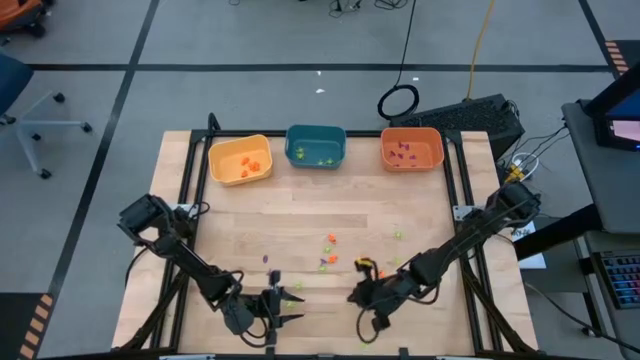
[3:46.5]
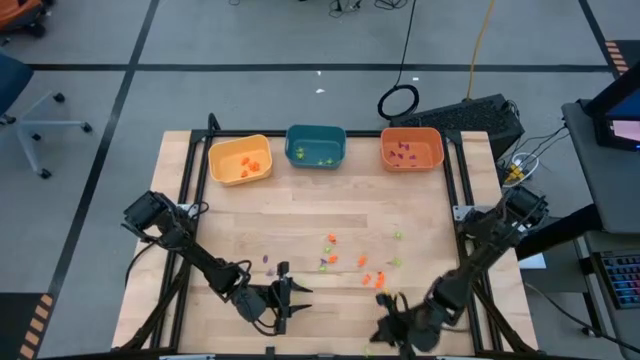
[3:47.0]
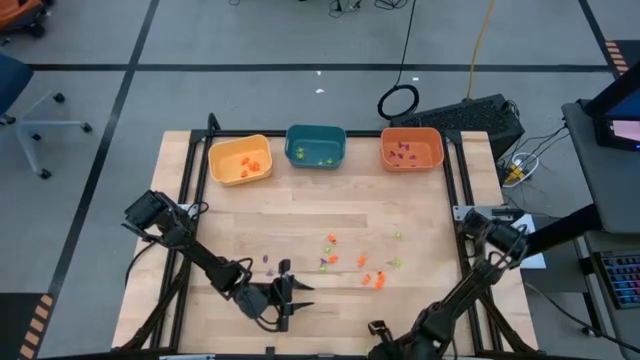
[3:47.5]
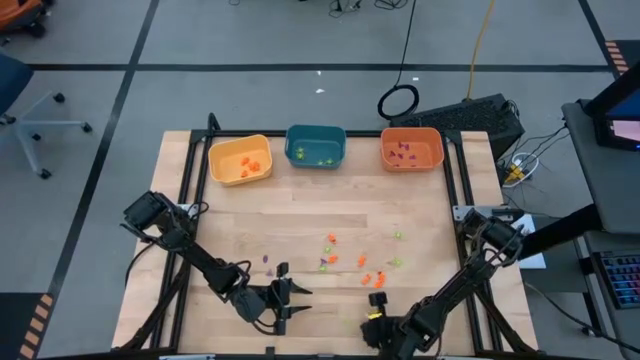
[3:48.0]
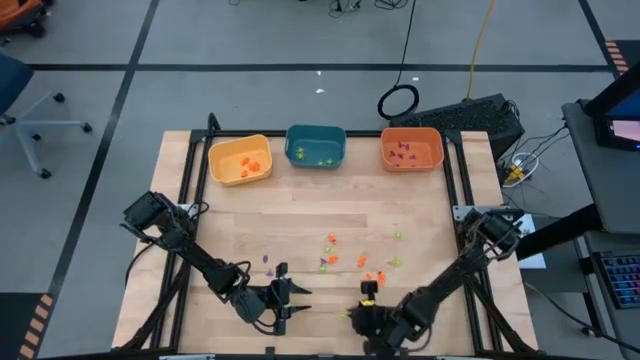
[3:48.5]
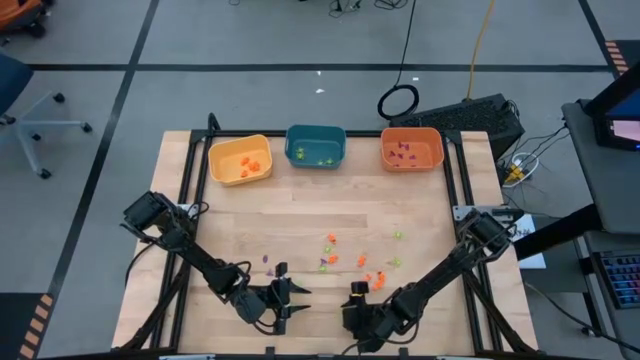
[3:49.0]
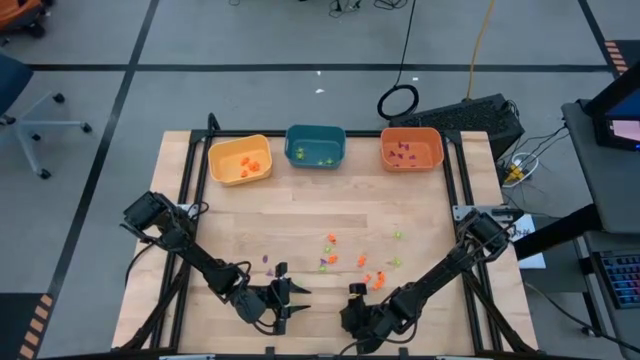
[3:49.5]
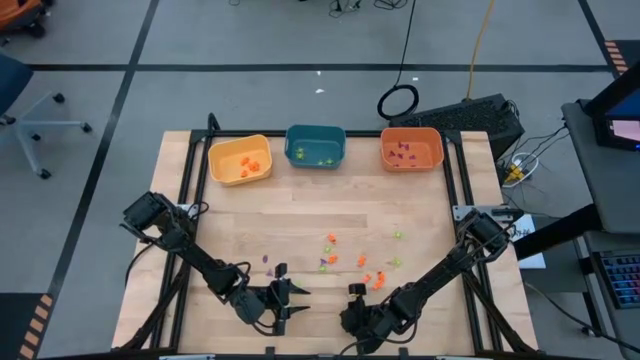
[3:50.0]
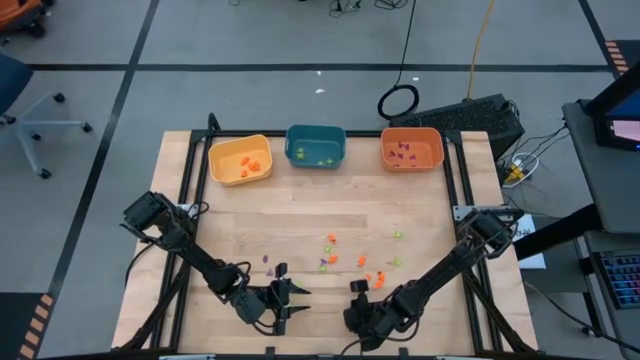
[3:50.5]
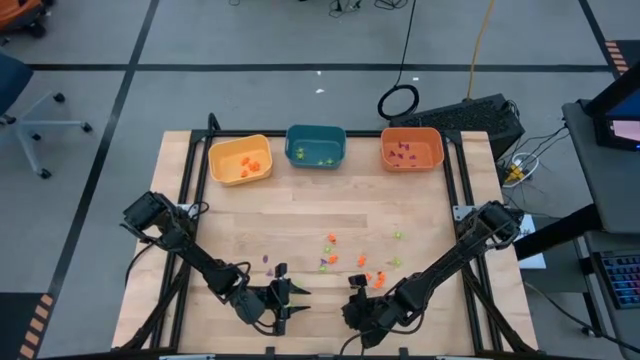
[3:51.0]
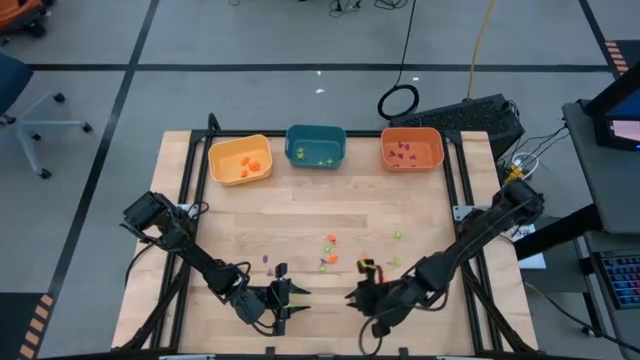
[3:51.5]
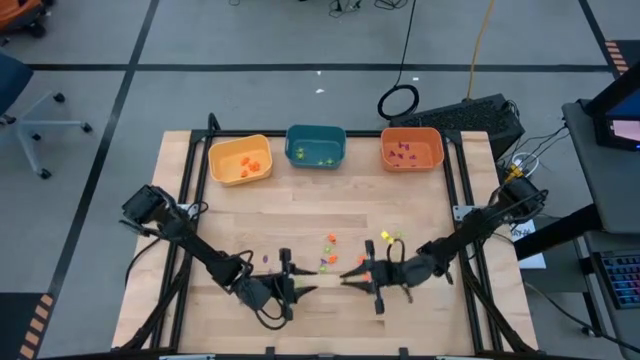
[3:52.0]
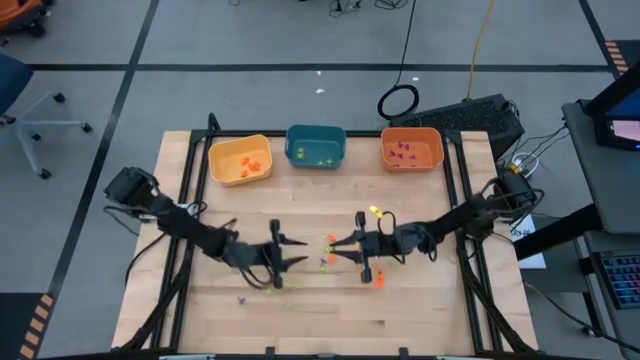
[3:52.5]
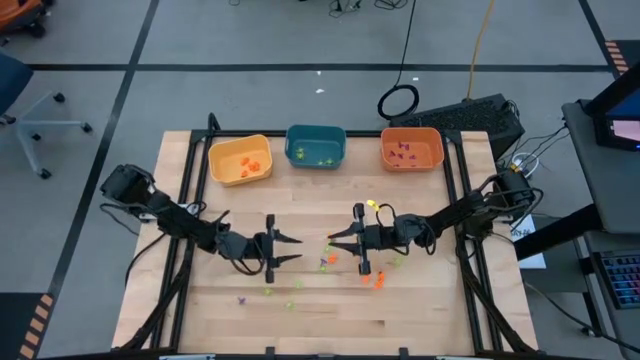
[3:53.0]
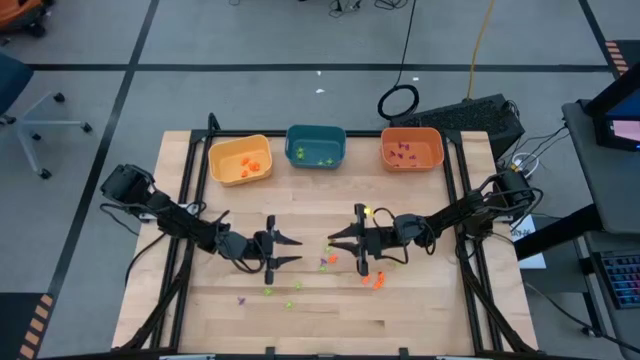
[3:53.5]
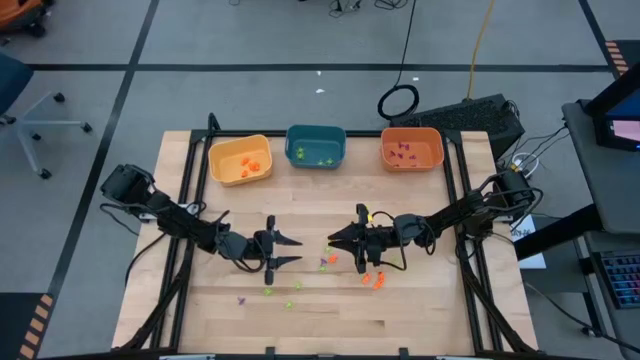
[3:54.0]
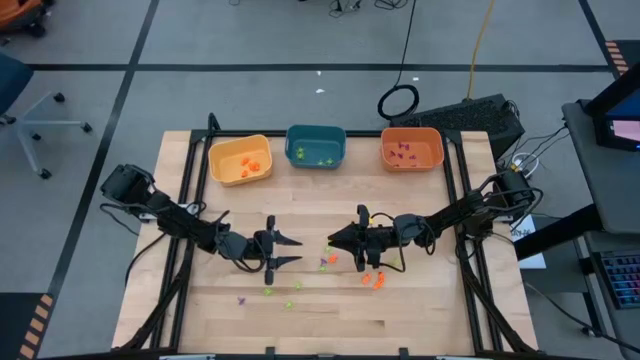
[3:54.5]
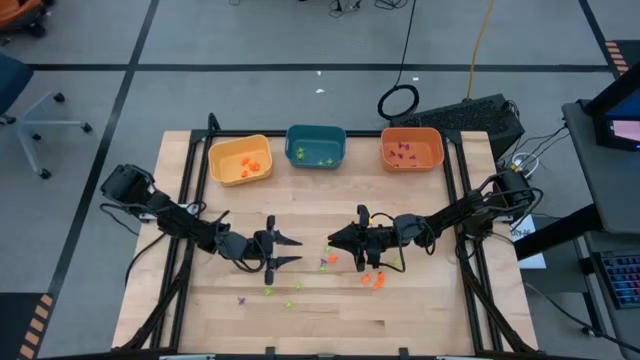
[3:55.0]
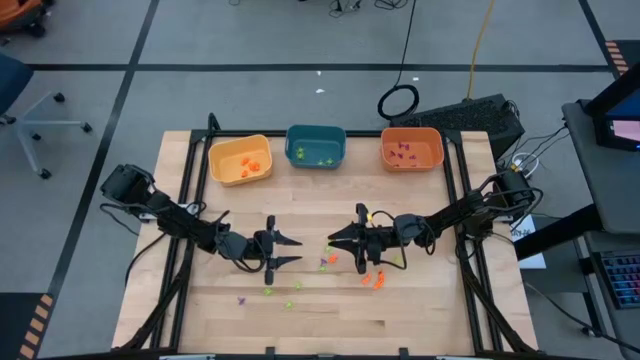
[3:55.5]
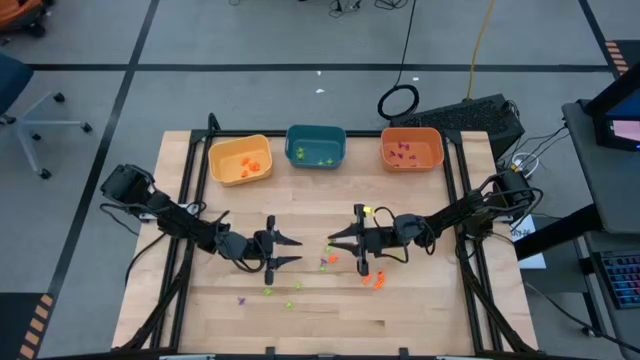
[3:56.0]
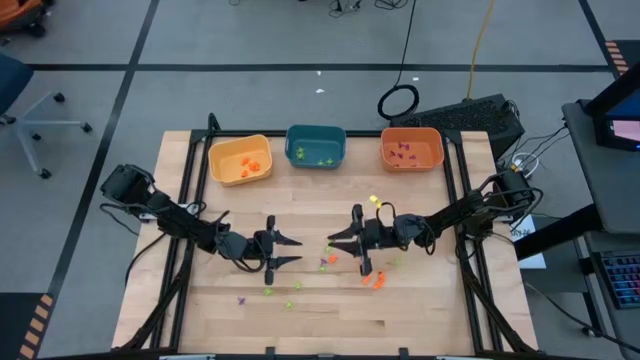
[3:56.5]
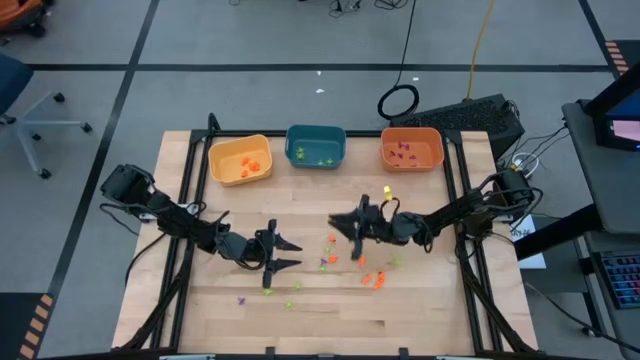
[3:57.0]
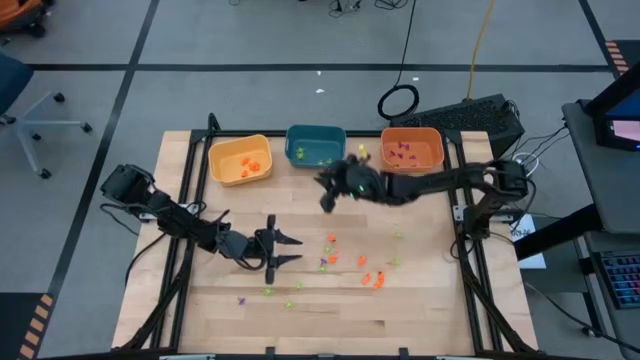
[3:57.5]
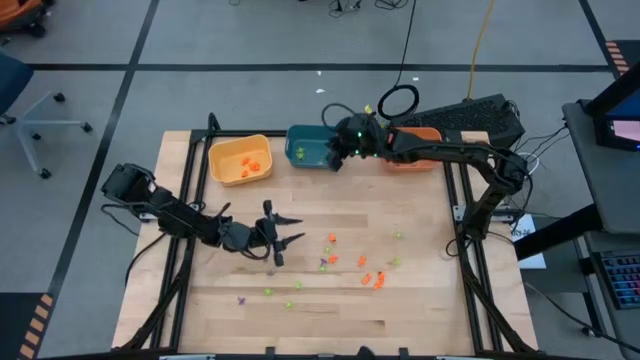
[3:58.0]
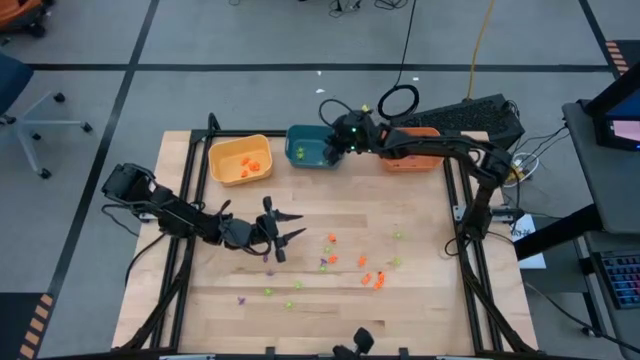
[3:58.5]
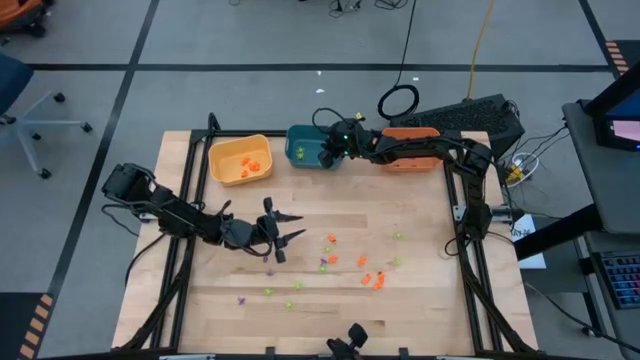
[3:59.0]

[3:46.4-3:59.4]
Task: Sort Halloween decoration
Put the green spider toy into the blue bin

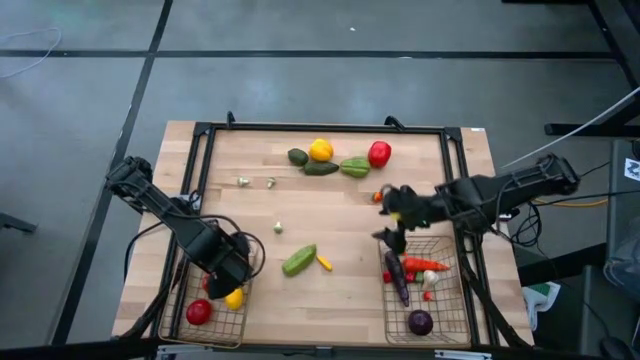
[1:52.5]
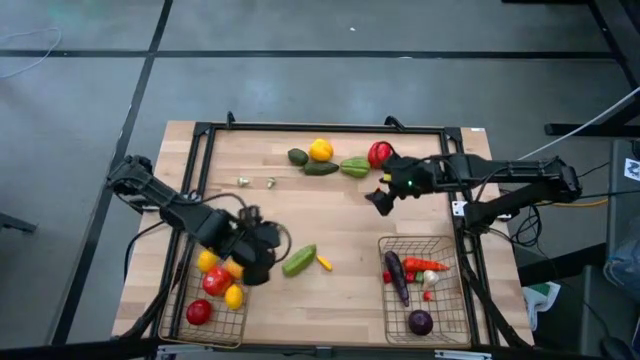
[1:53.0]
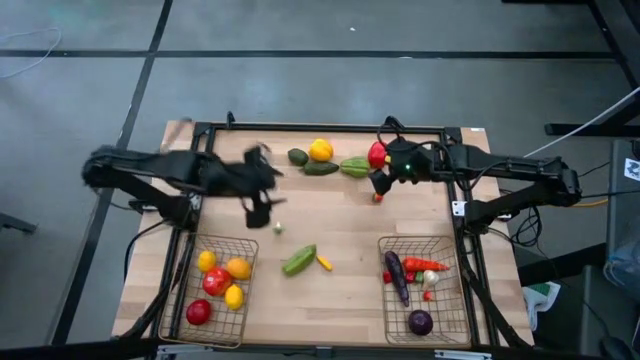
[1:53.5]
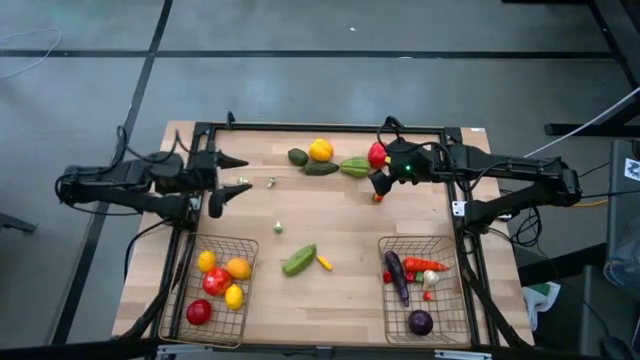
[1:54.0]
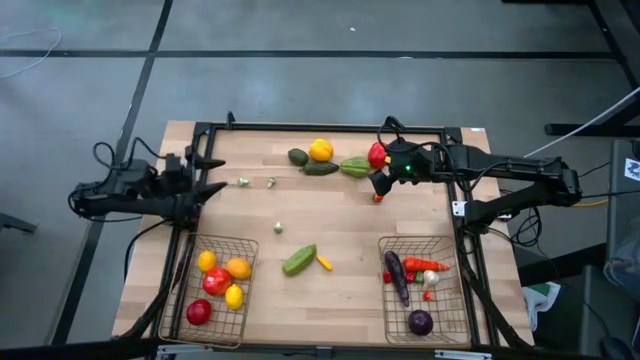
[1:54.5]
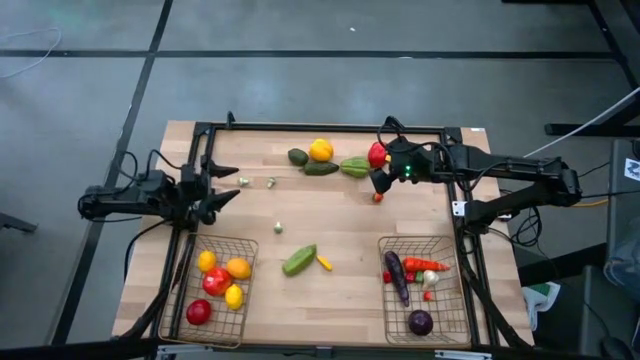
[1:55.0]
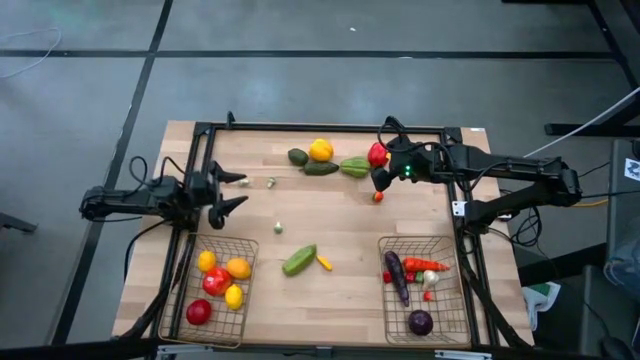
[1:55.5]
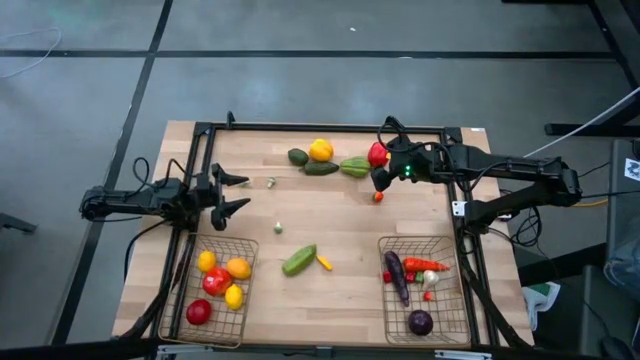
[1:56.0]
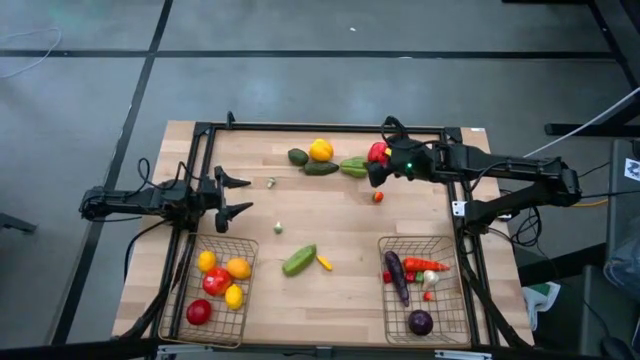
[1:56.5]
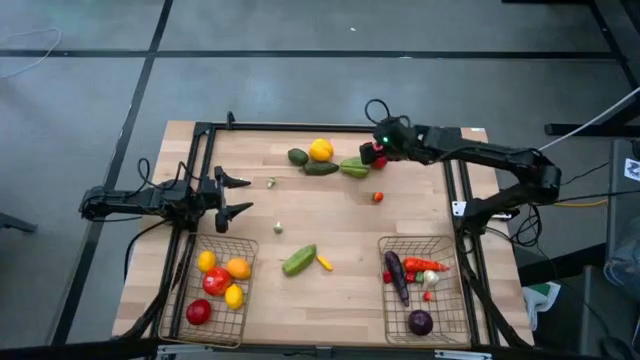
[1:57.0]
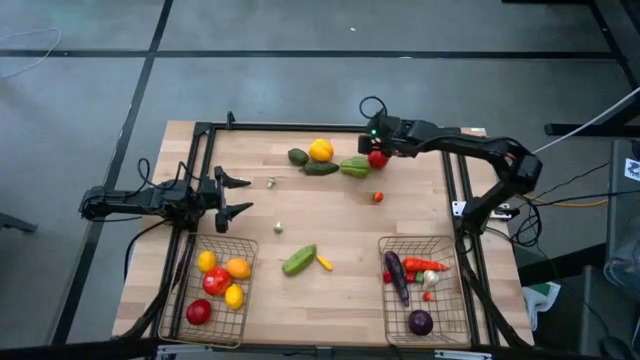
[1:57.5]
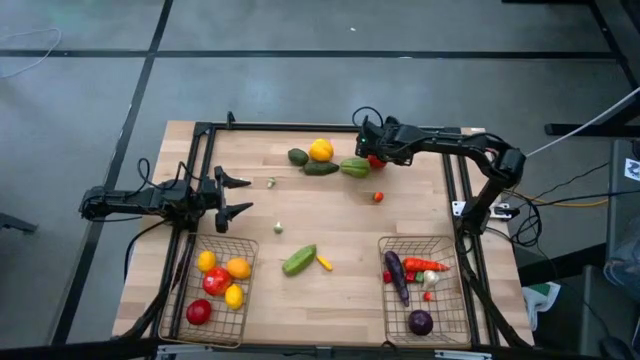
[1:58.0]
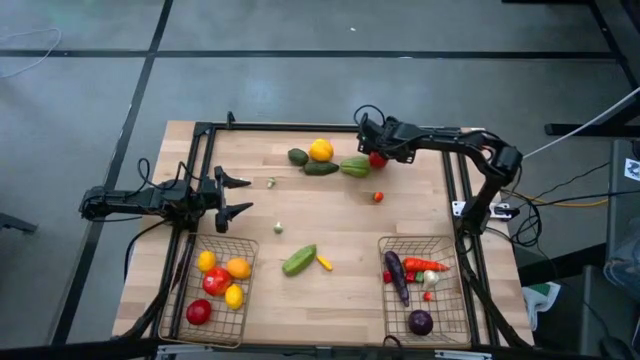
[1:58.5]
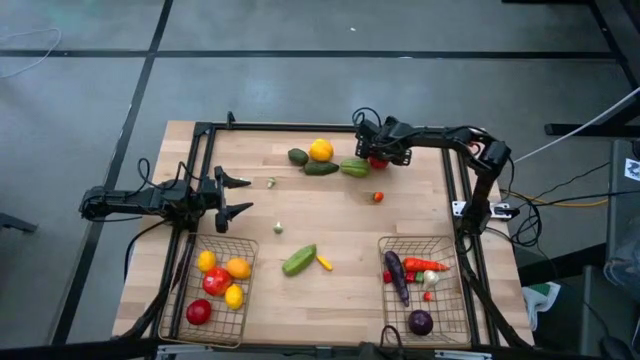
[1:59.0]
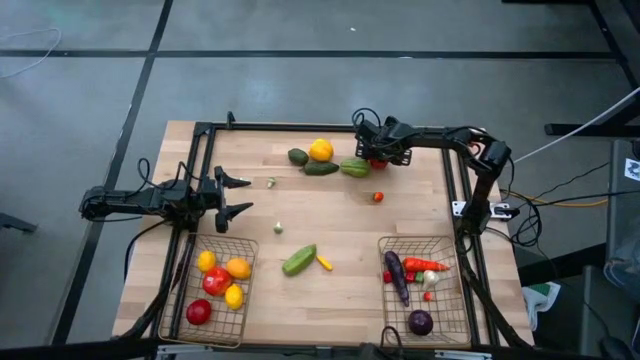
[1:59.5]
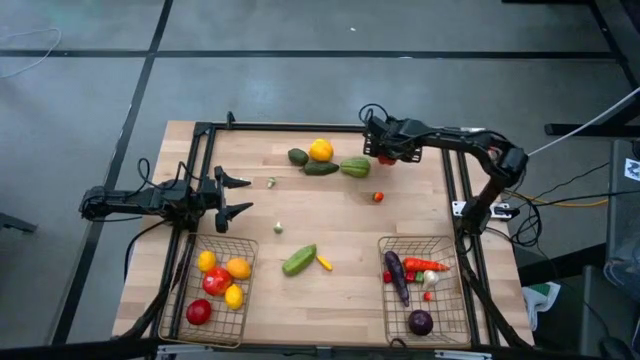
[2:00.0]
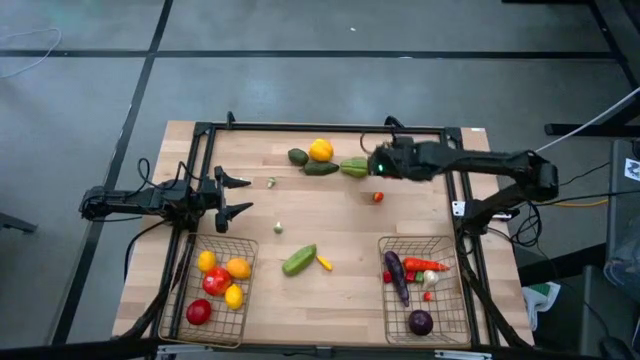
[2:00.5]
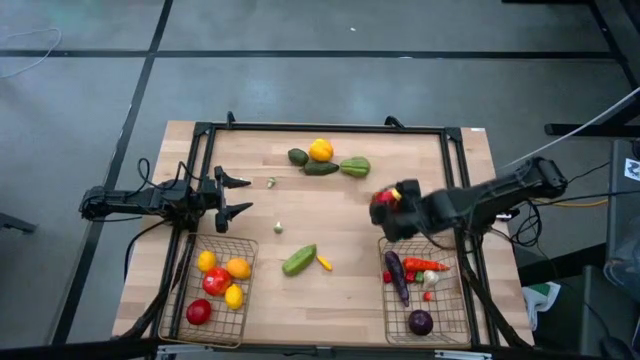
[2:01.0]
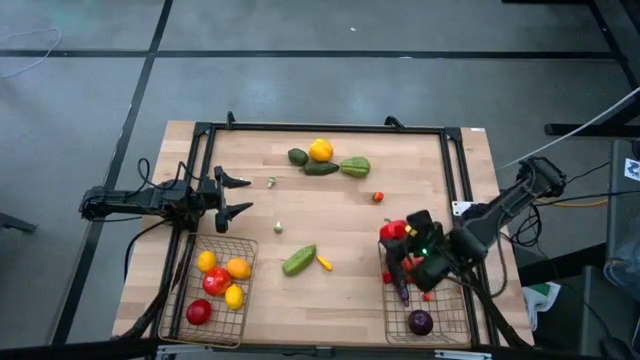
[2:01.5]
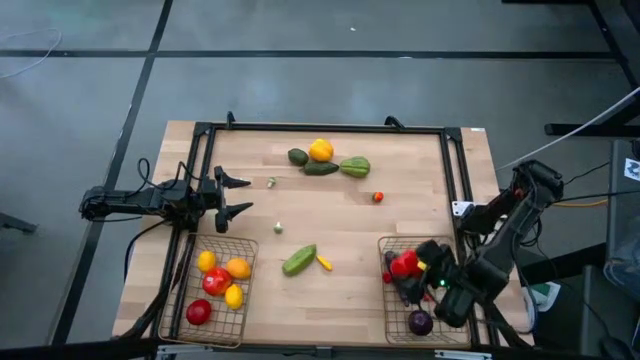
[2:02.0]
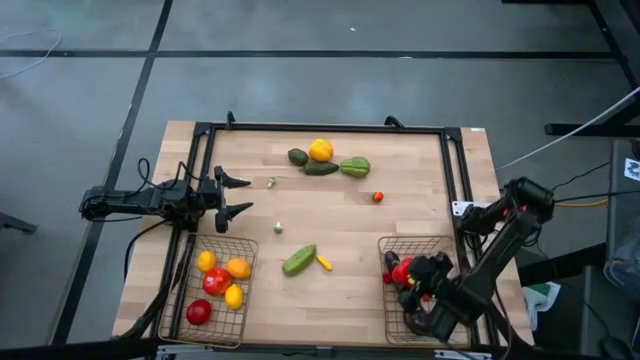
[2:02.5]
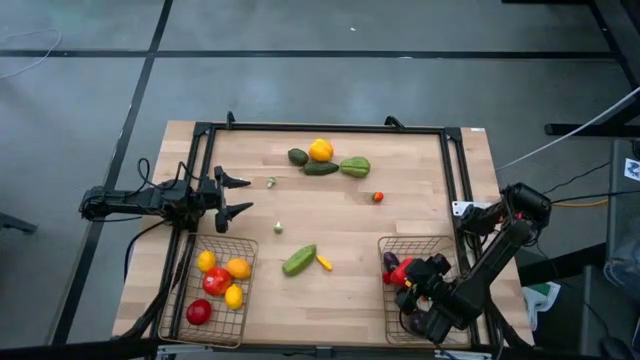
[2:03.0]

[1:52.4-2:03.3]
Task: Sort produce into baskets
Put the red bell pepper into the right wire basket
